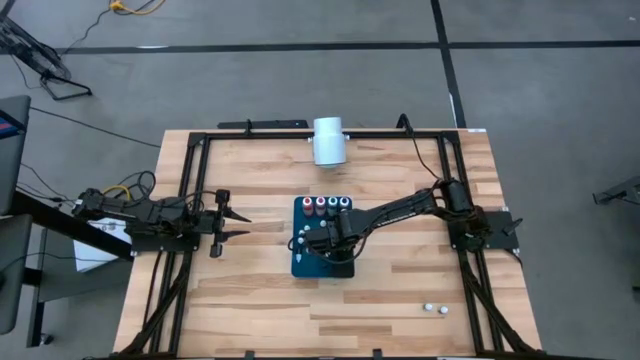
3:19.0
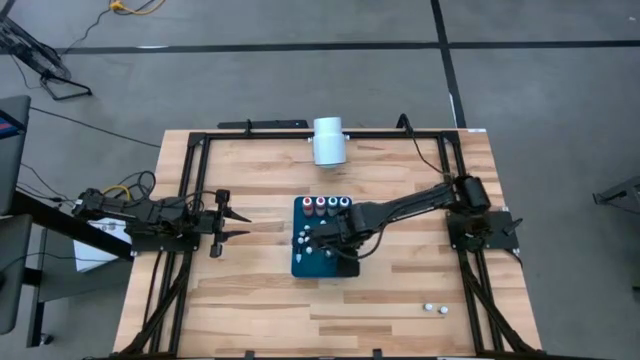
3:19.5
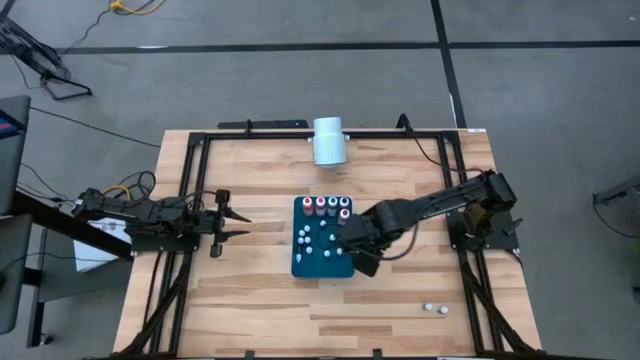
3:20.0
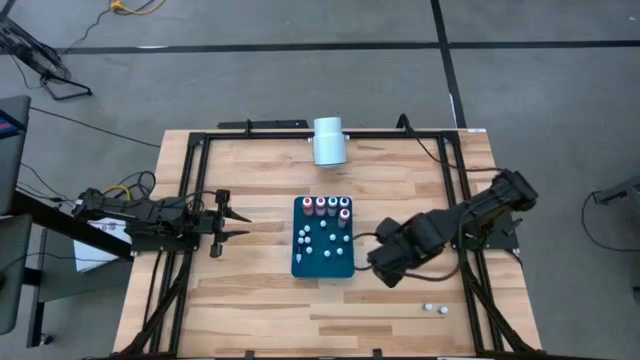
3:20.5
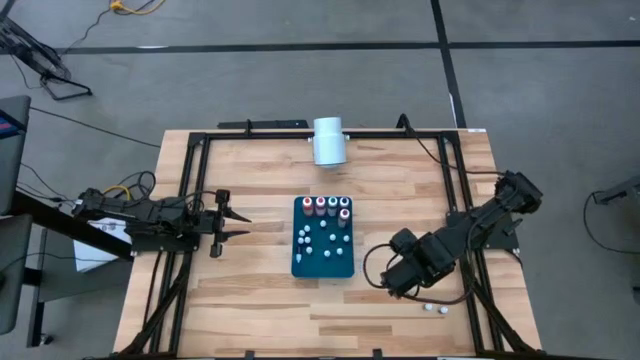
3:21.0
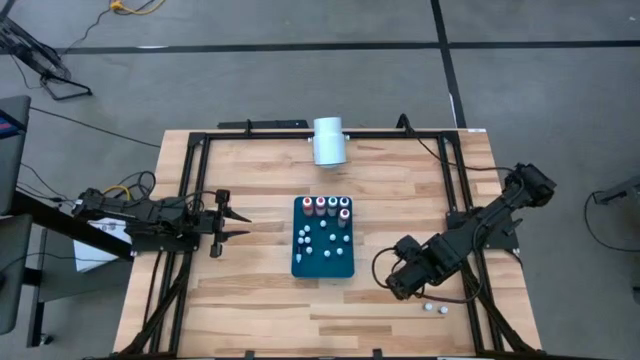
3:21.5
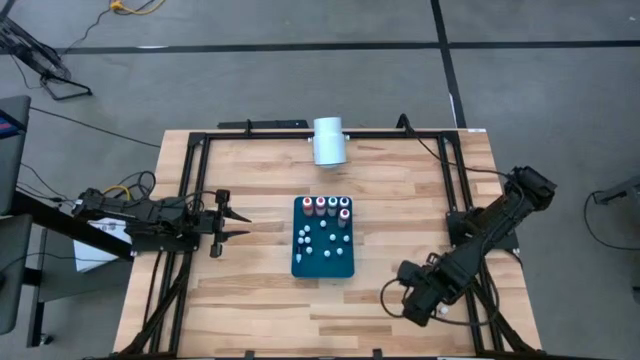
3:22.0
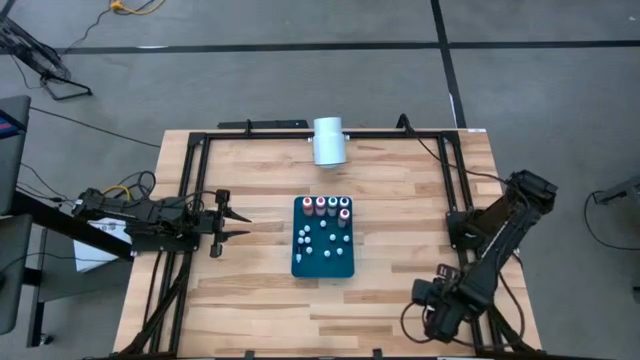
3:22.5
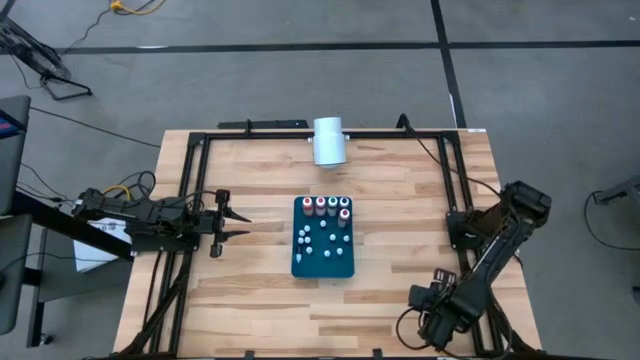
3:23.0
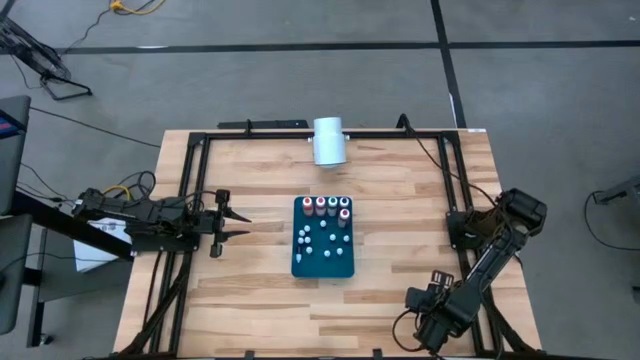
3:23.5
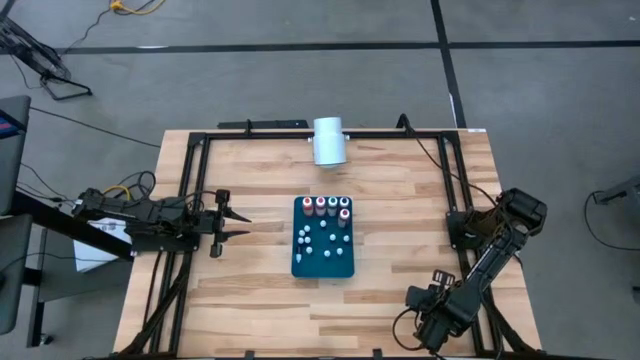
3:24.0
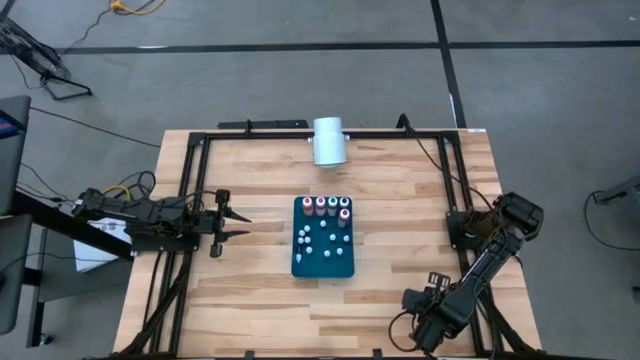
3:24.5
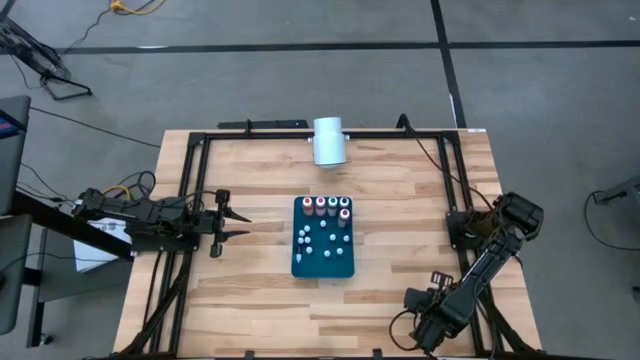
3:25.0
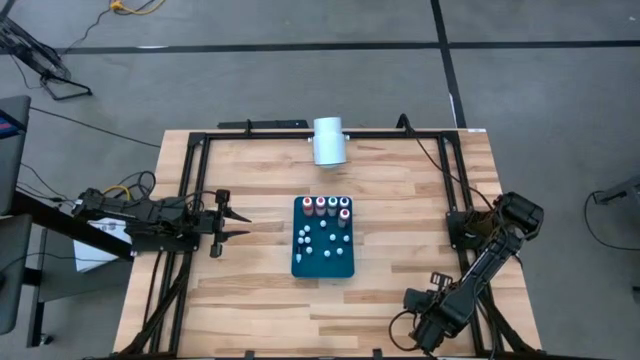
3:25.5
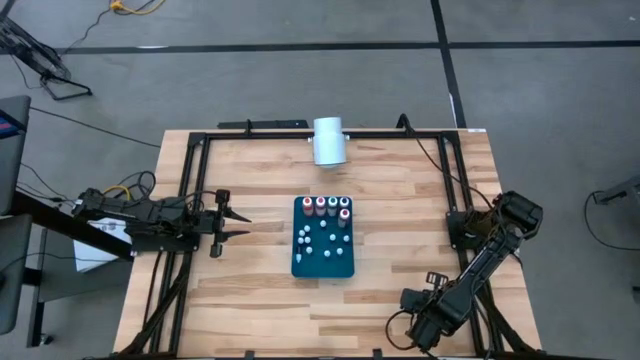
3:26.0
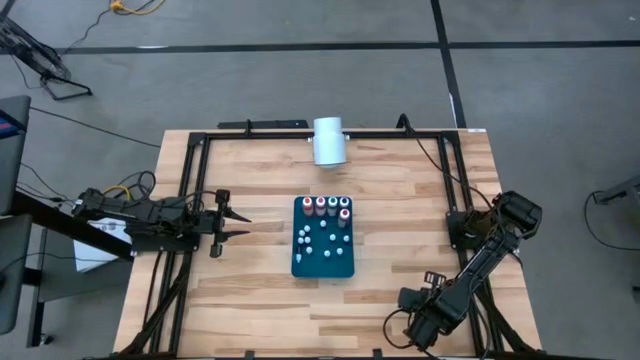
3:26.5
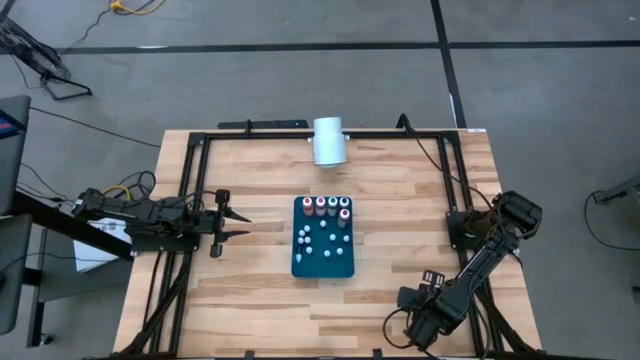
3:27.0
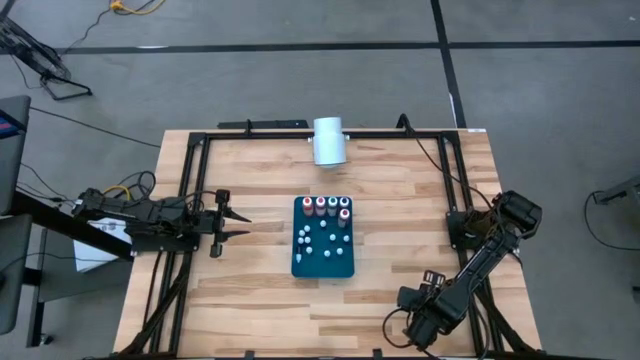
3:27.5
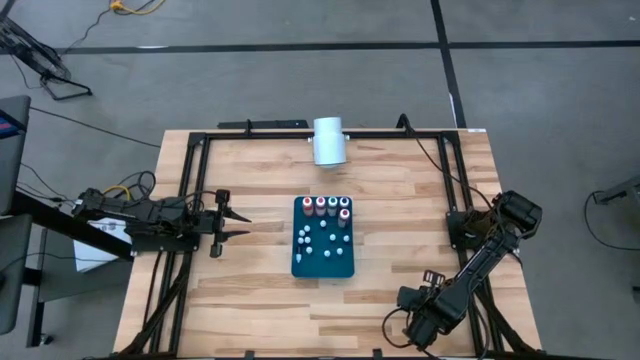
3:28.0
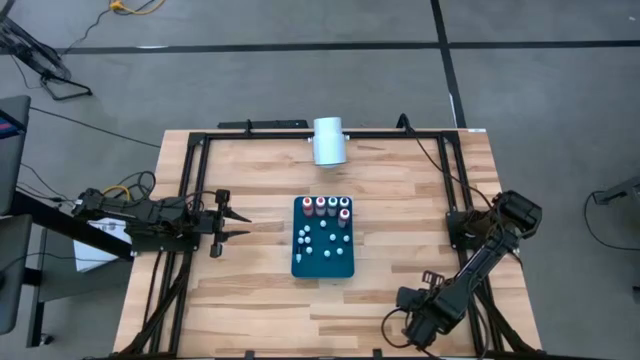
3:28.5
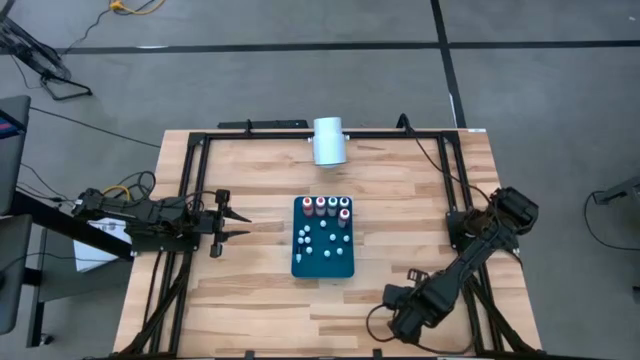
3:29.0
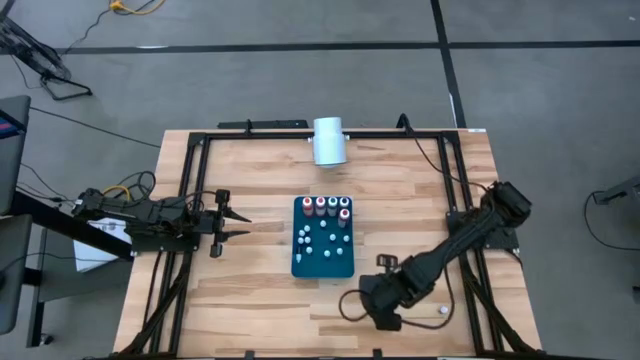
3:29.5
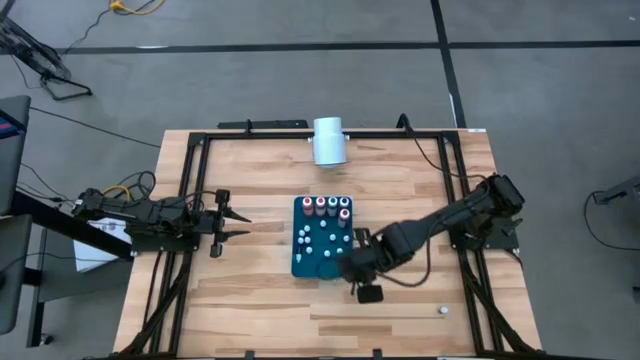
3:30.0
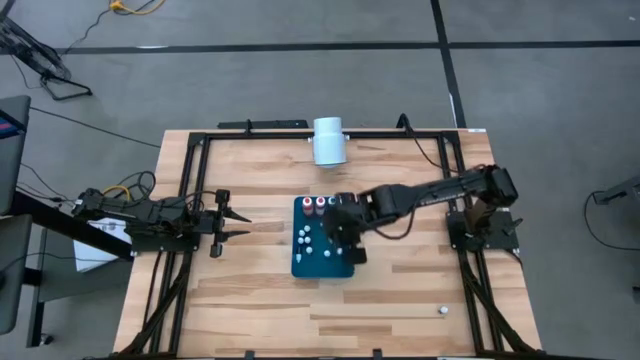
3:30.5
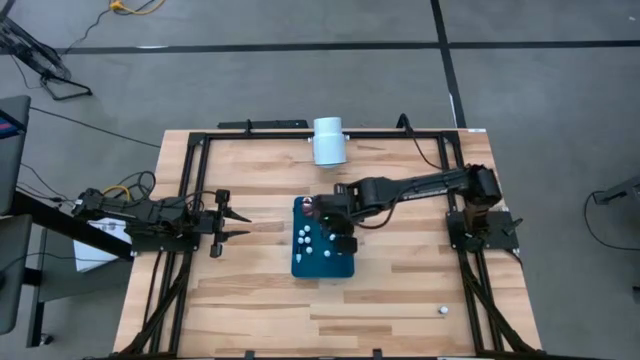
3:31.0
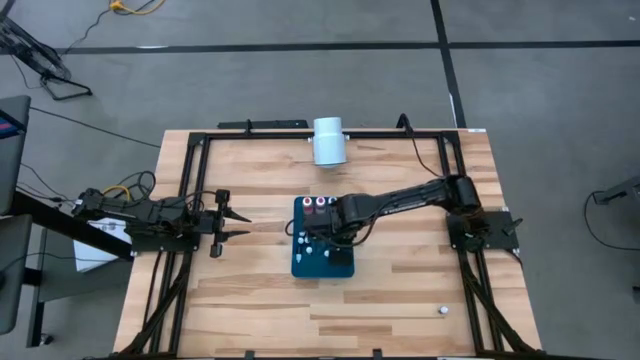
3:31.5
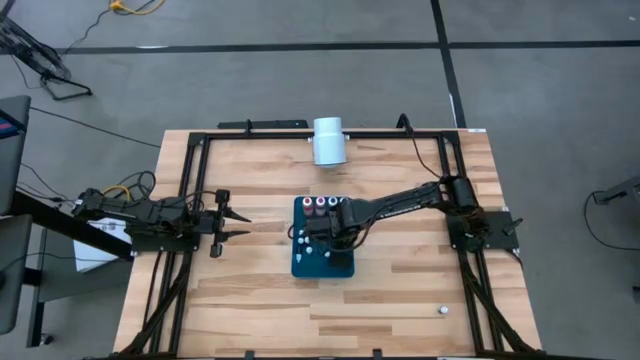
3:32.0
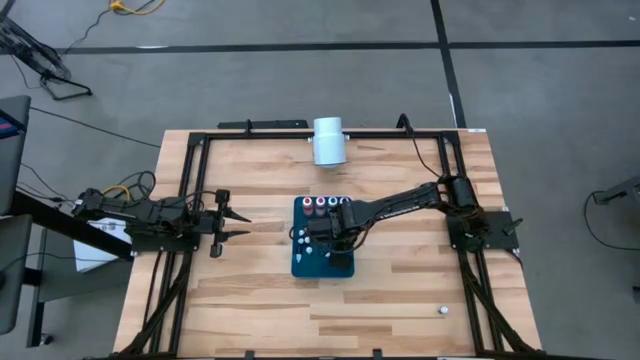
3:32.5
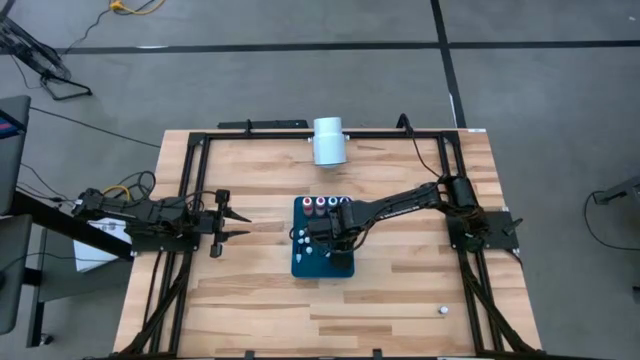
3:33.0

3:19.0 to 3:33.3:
Task: Pick & Place food coloring
Put the small green food coloring bottle into the blue bin

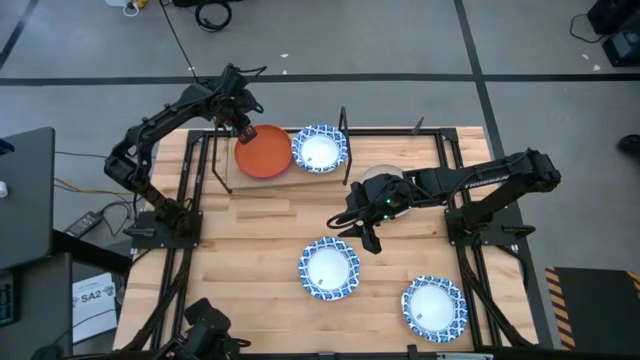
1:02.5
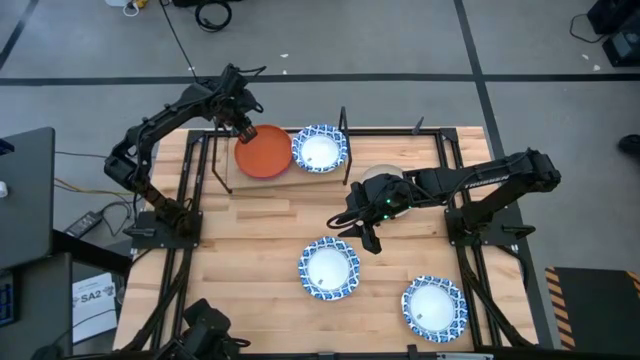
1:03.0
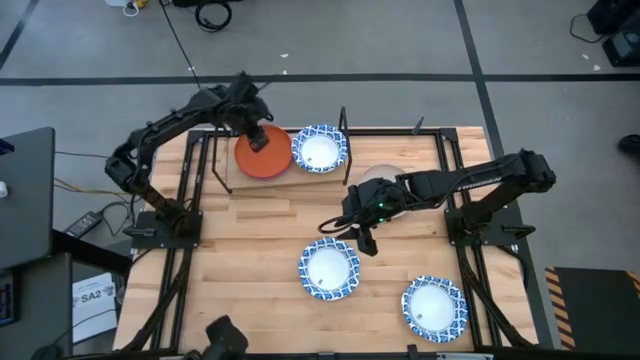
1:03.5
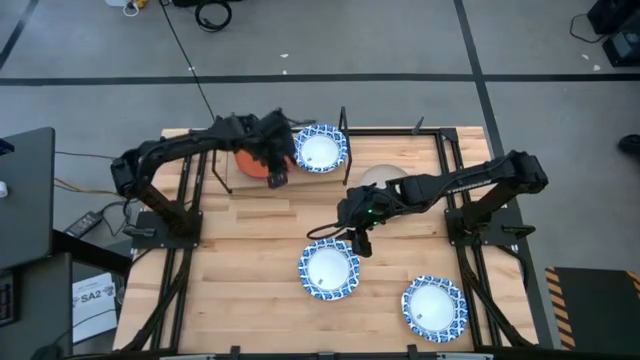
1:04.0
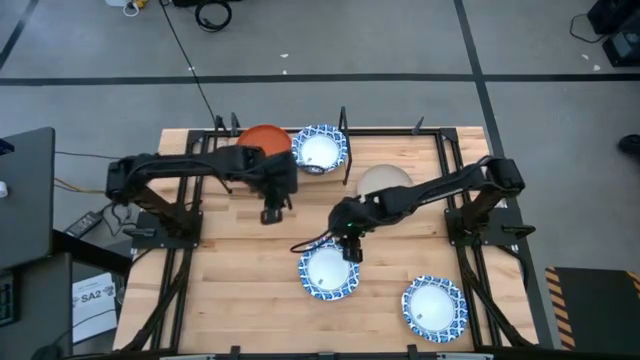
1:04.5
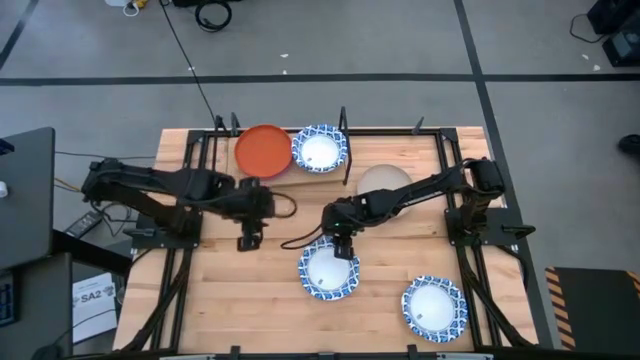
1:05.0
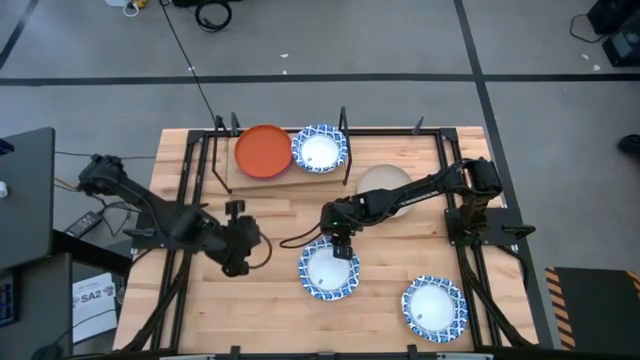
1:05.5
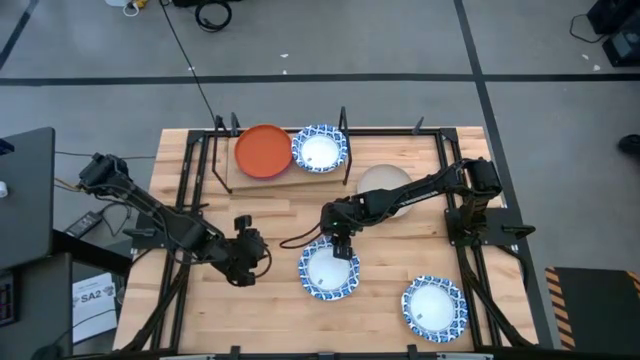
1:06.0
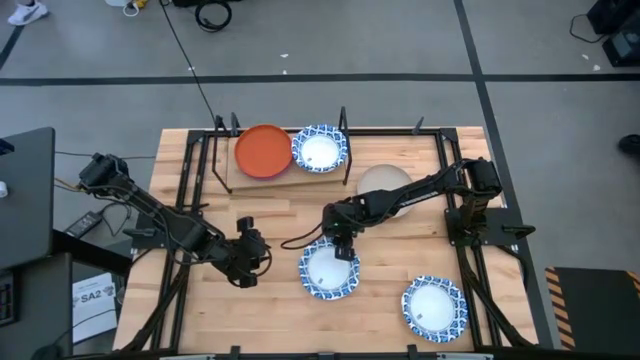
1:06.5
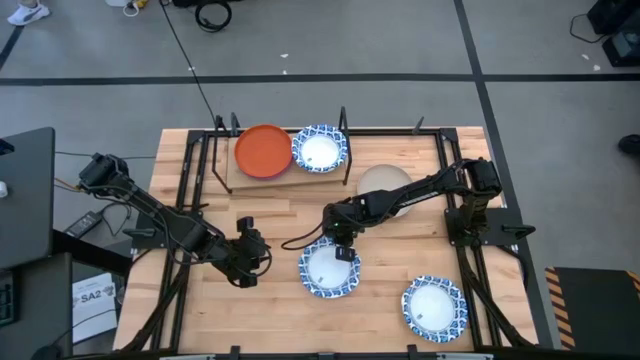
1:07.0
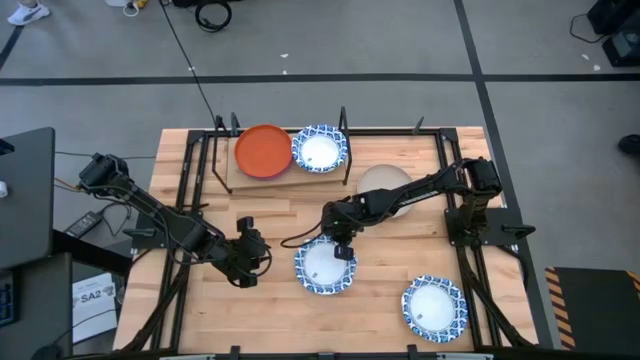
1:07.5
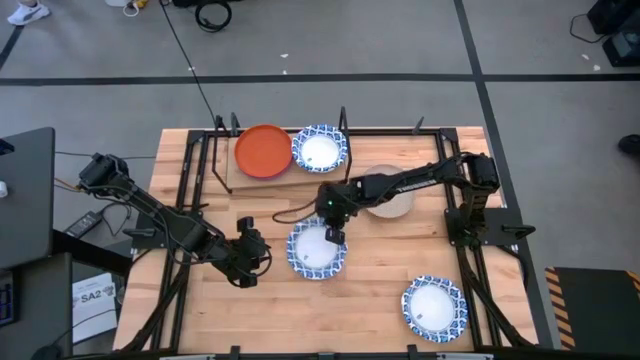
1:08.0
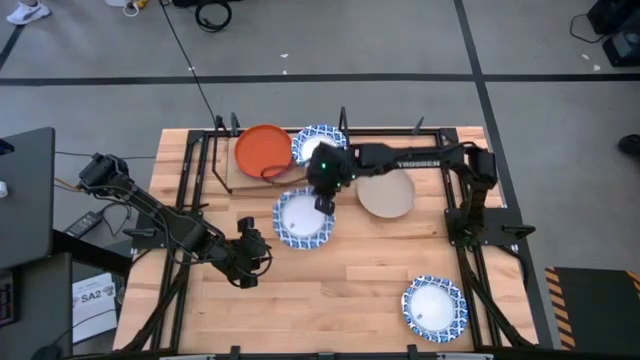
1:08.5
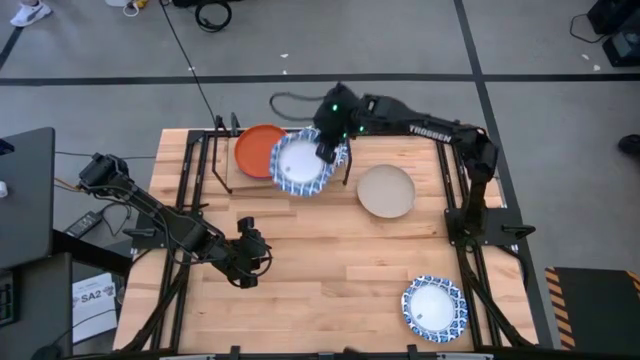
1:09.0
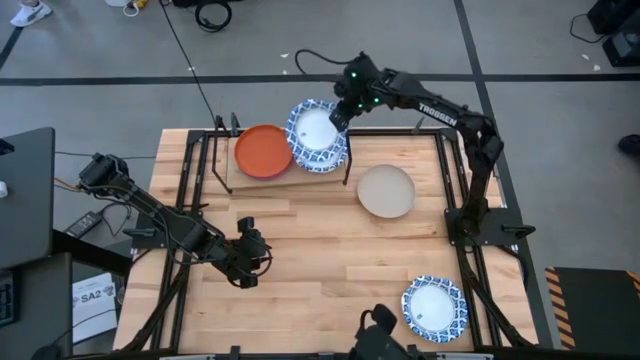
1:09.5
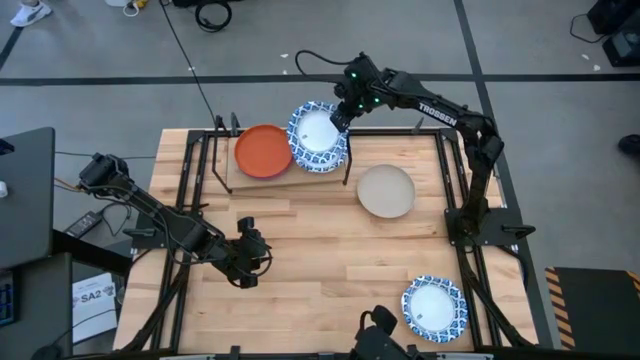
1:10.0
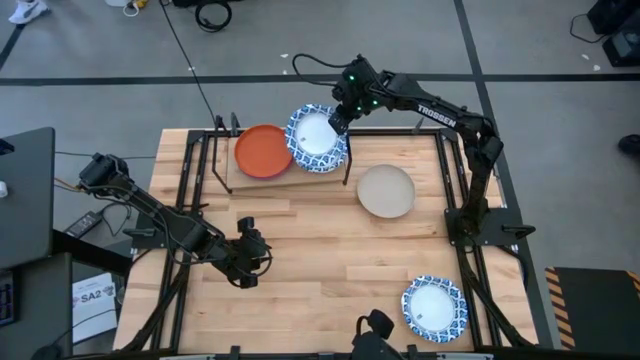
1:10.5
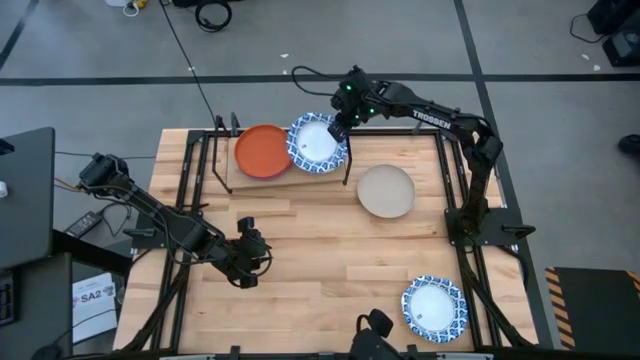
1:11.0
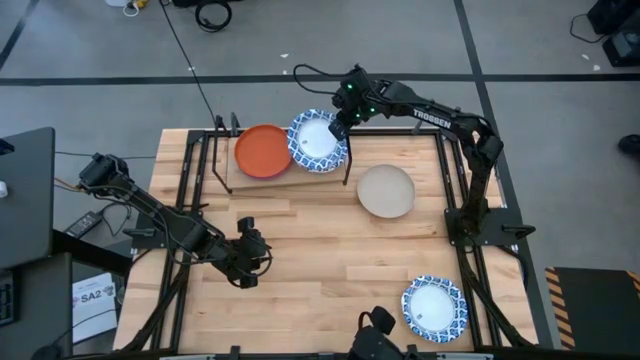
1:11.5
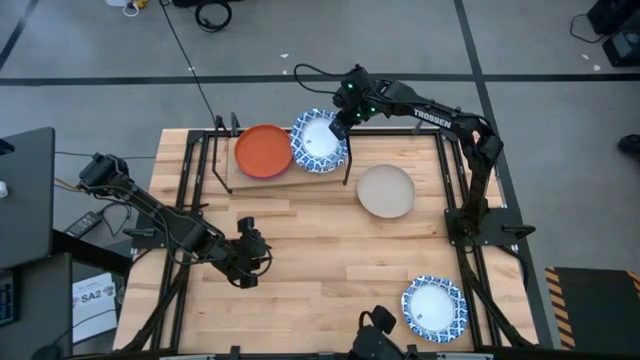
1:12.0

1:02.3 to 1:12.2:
Task: Place and stack plates onto a shelf
Stack the blue patterned bowl on top of the blue patterned bowl on the shelf
